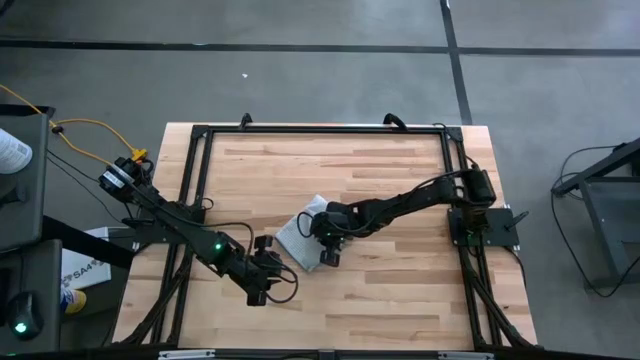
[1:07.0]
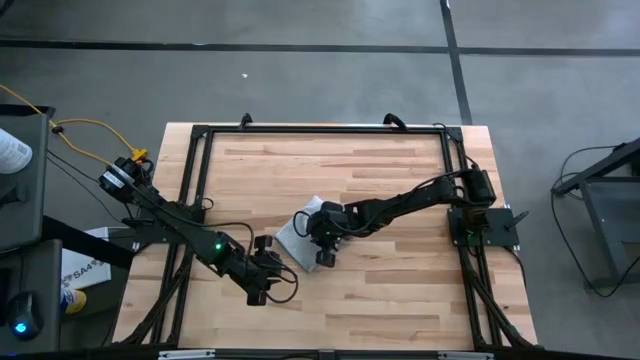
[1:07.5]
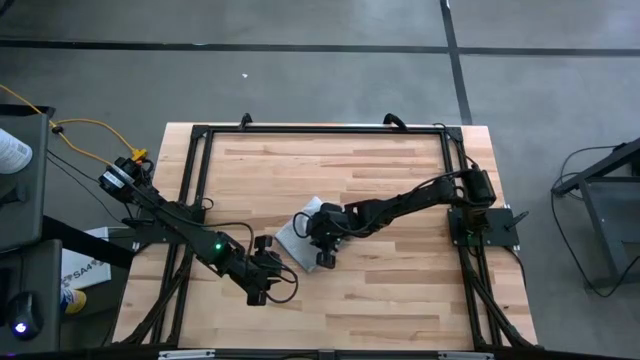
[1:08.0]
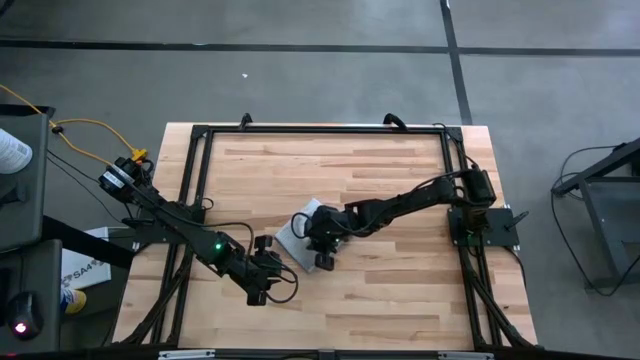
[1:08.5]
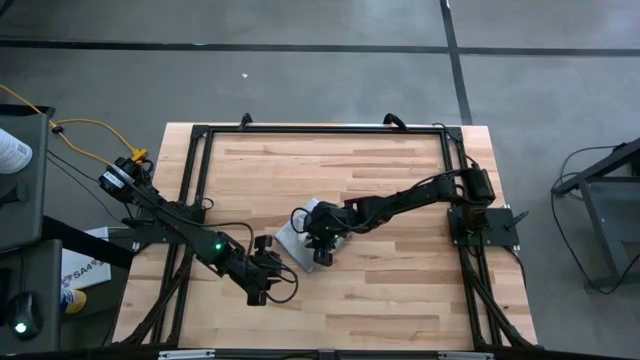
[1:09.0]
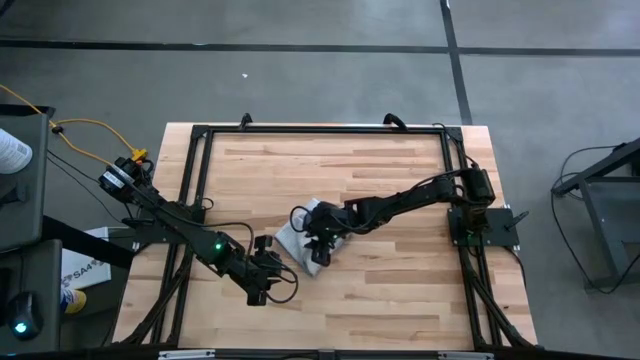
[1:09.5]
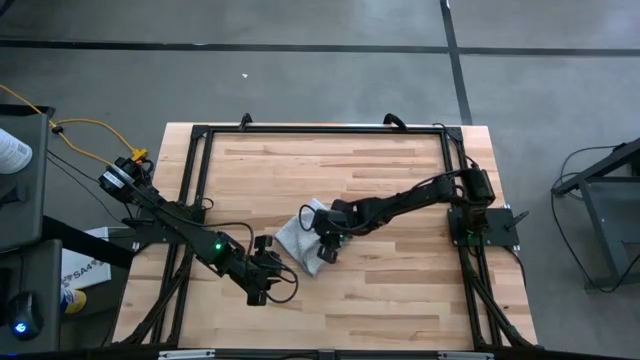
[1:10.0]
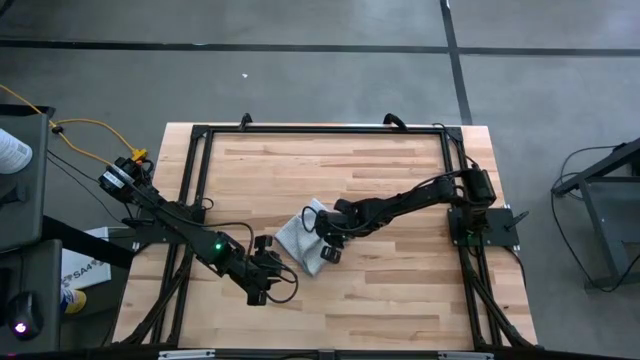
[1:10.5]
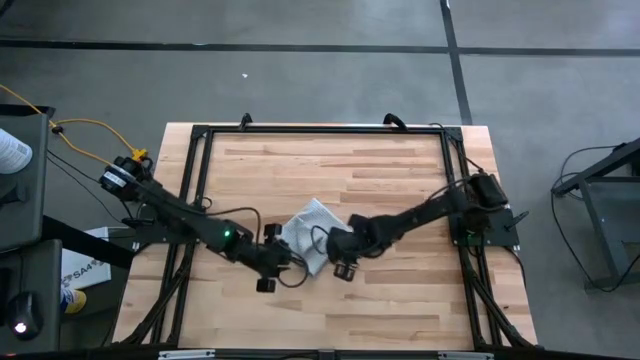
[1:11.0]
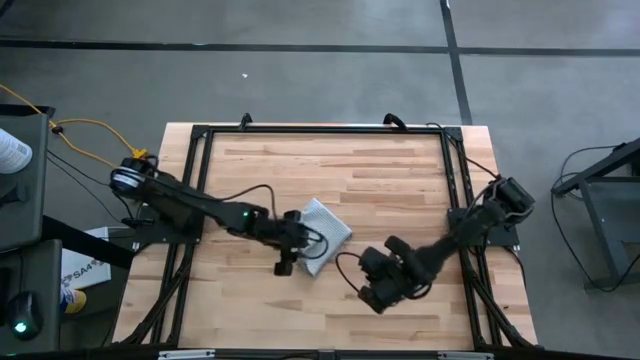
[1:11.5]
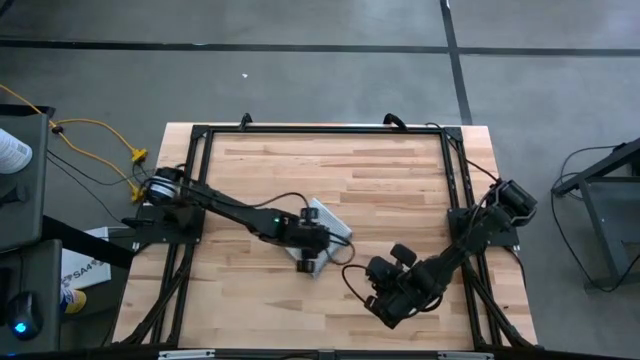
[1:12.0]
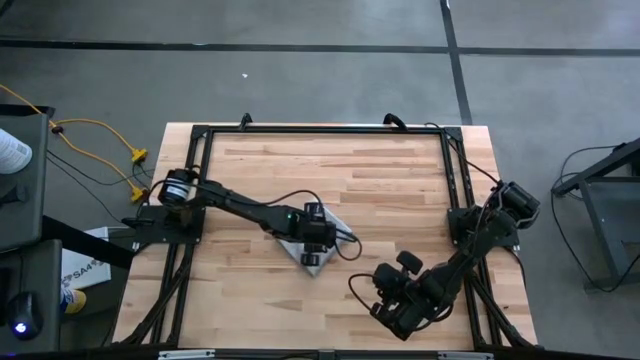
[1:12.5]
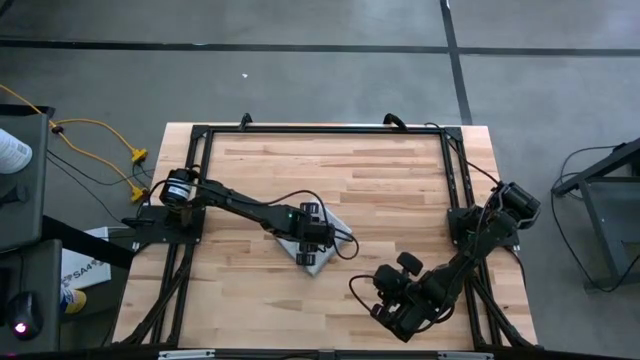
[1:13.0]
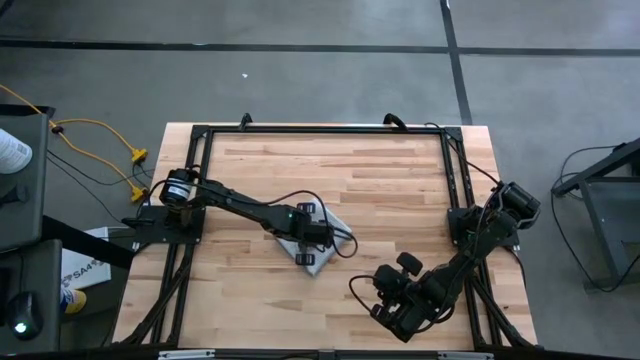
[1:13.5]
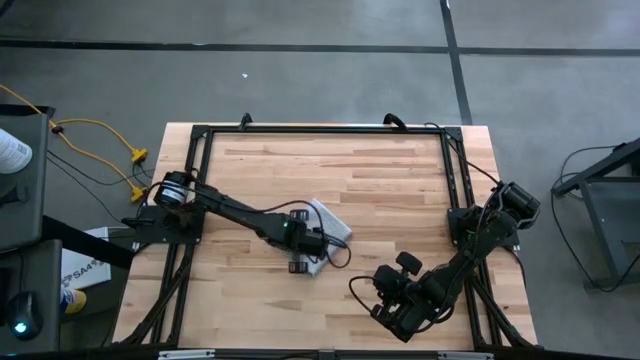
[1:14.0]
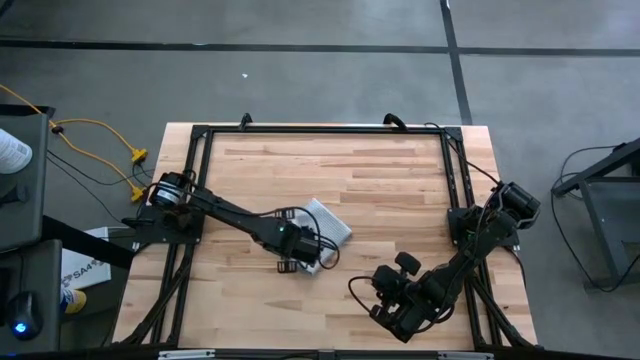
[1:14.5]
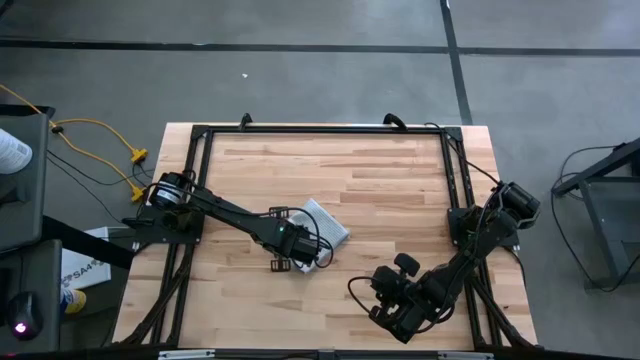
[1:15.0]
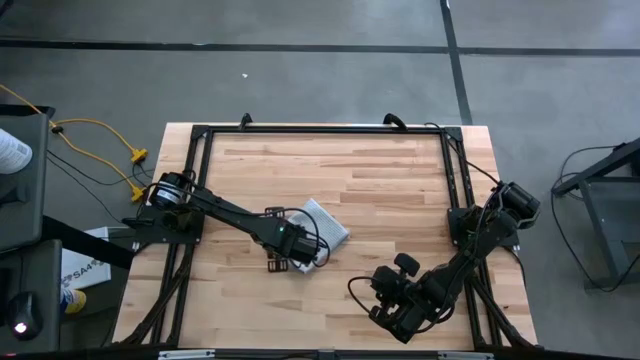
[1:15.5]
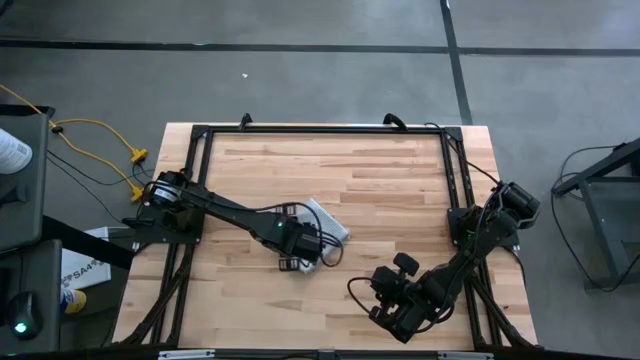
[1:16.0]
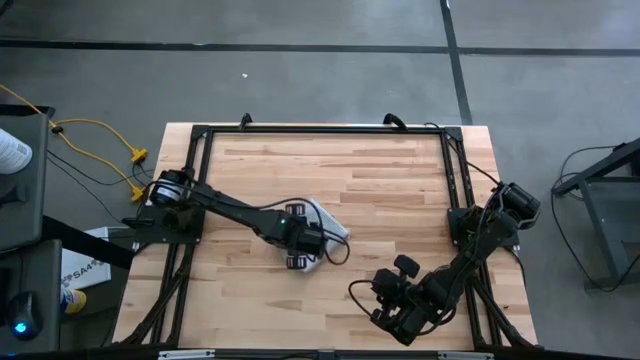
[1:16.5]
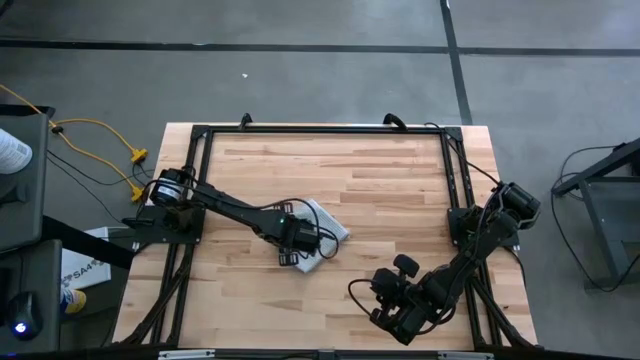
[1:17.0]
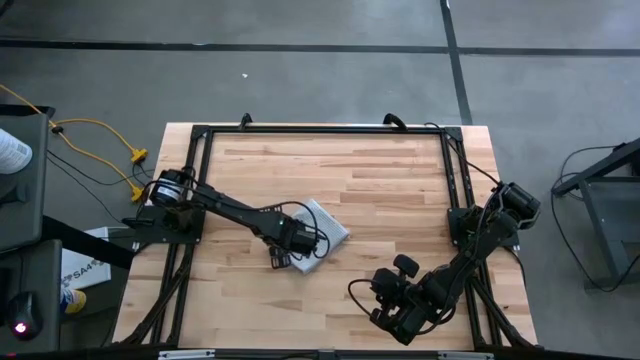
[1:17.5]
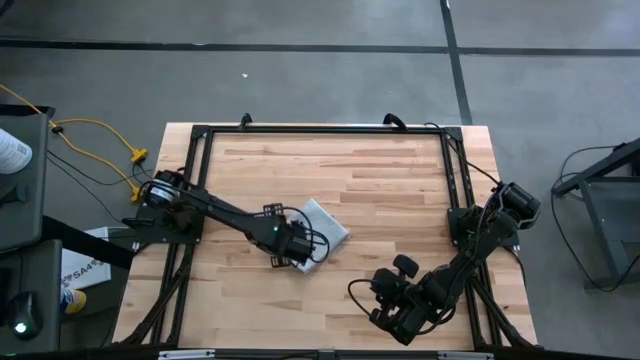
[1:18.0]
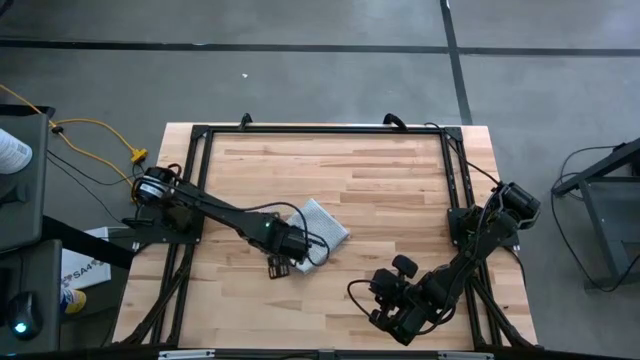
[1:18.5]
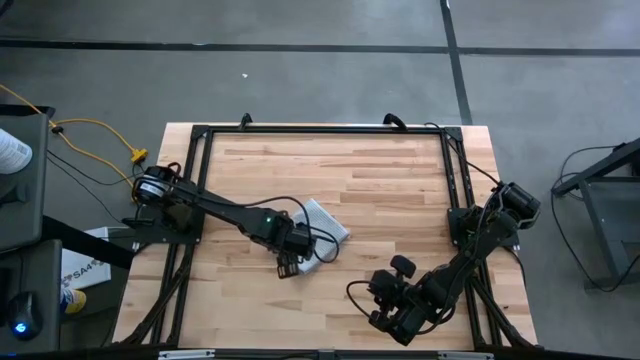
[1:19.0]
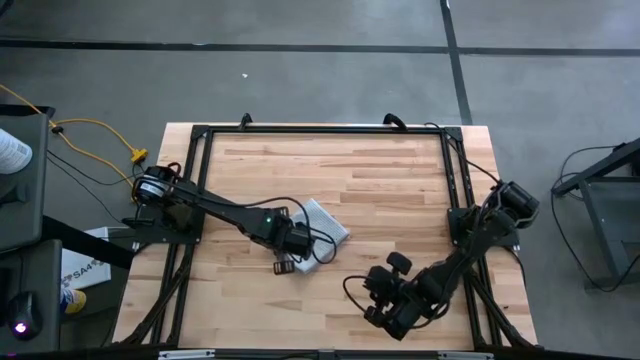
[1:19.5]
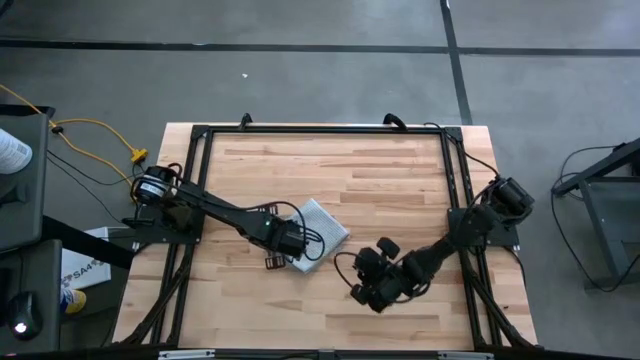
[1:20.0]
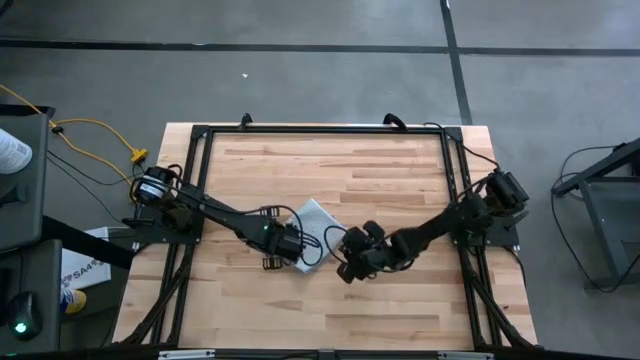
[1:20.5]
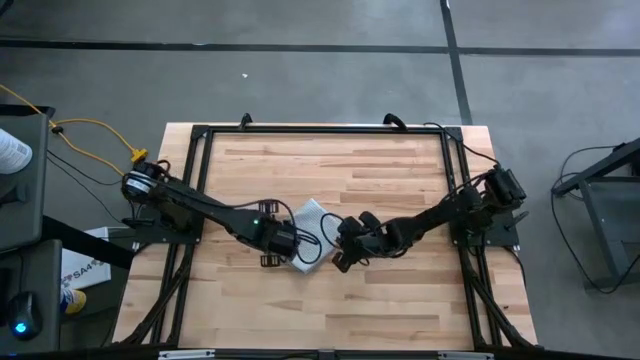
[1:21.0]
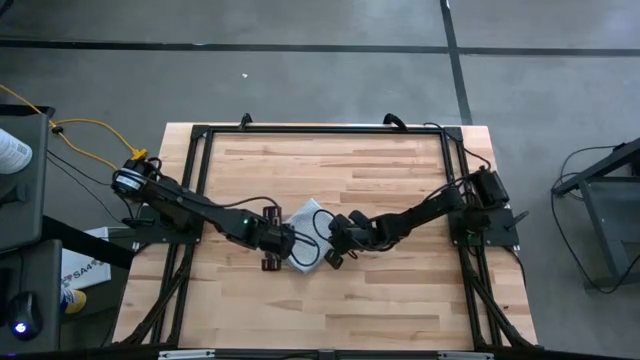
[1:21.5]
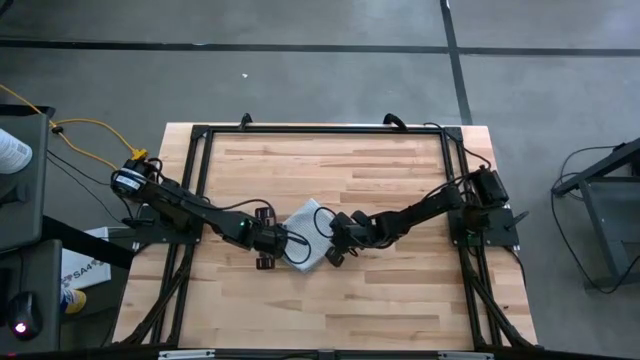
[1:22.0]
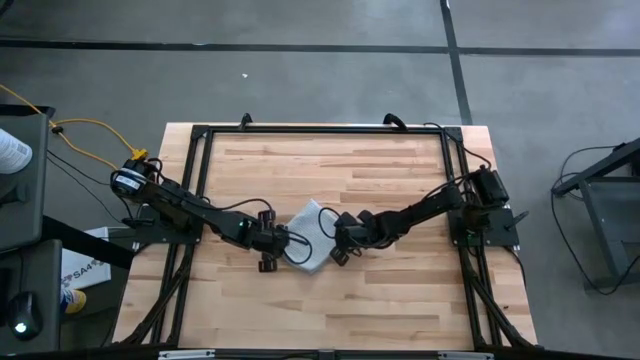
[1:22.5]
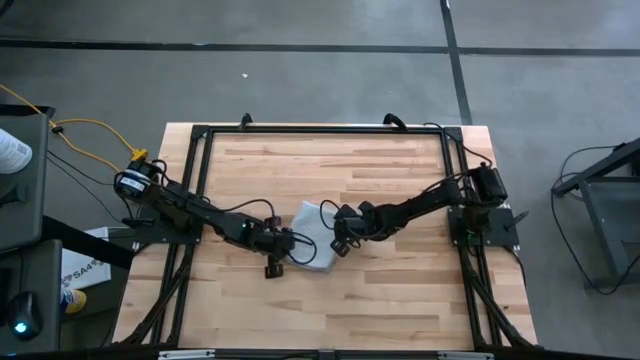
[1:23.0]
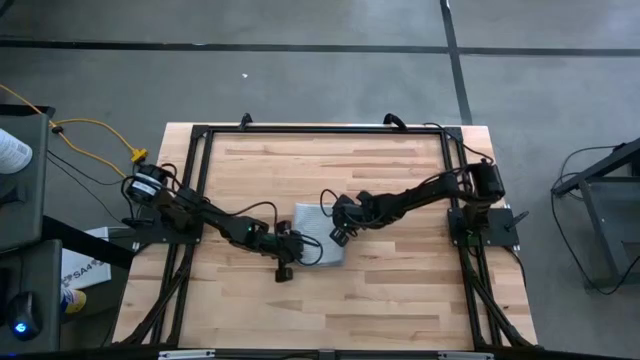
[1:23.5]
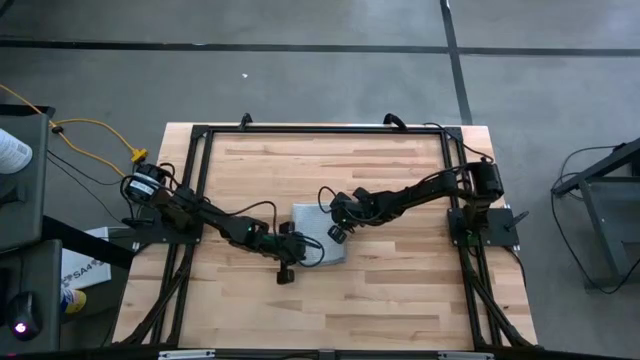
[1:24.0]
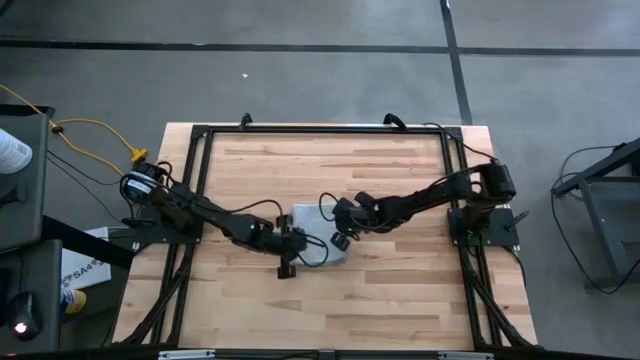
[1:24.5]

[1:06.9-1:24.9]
Task: Fold microfiber towels
Fold the gray microfiber cloth

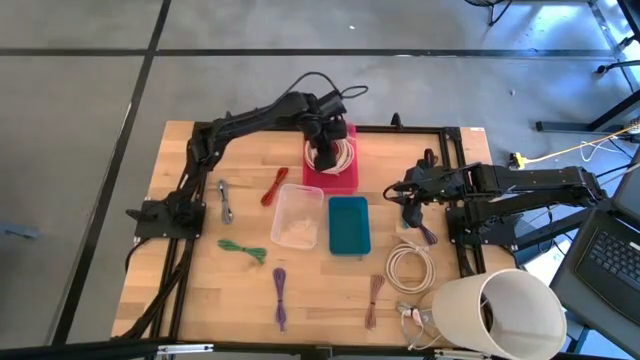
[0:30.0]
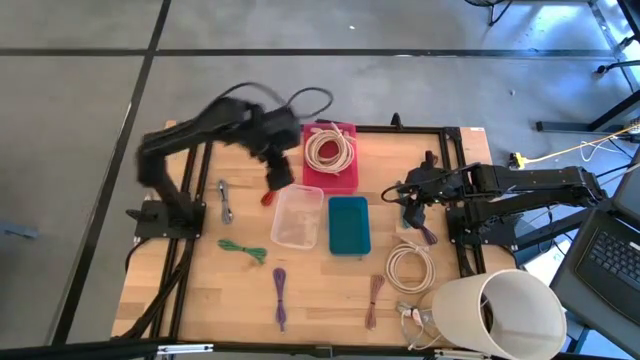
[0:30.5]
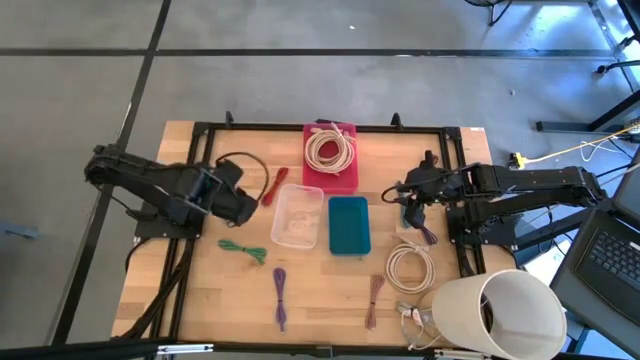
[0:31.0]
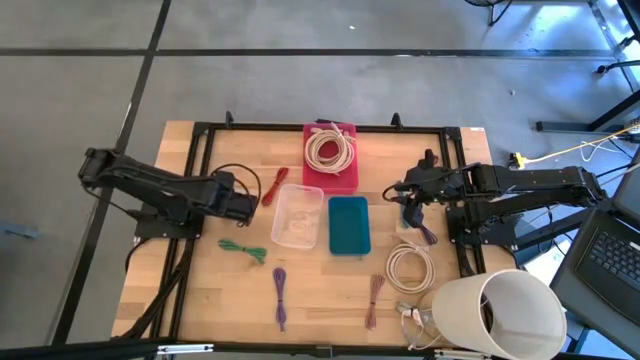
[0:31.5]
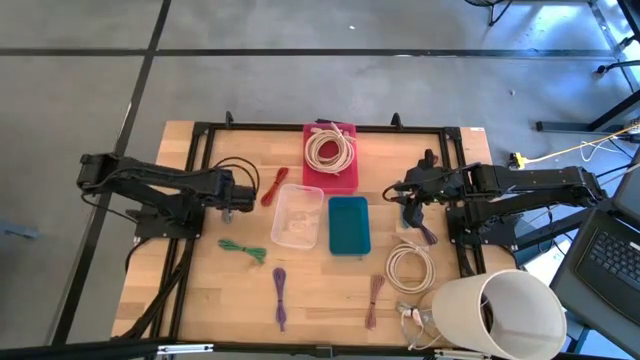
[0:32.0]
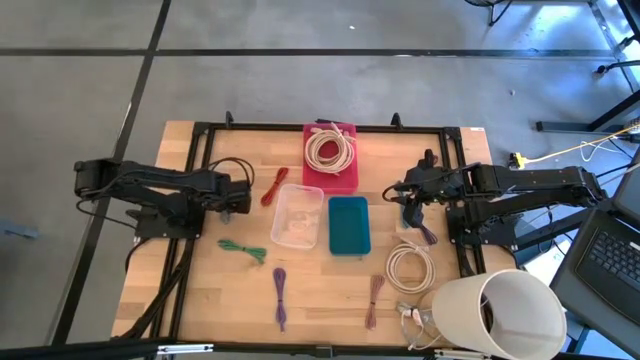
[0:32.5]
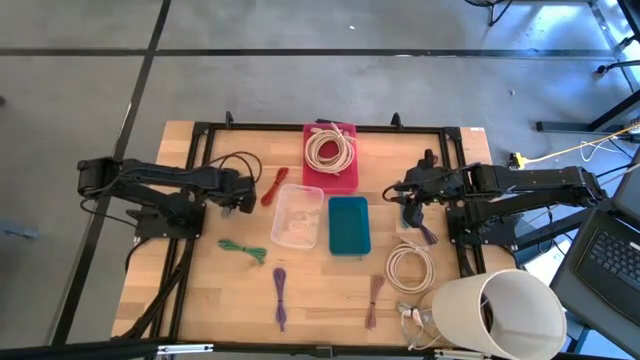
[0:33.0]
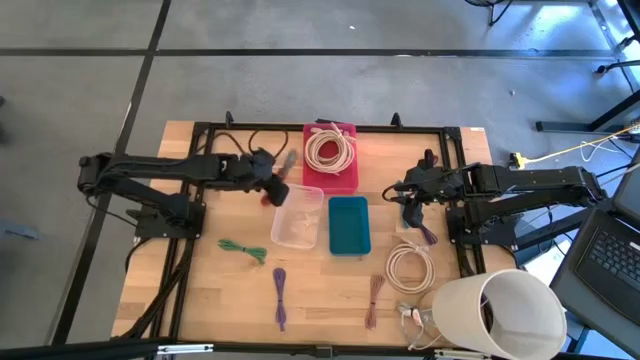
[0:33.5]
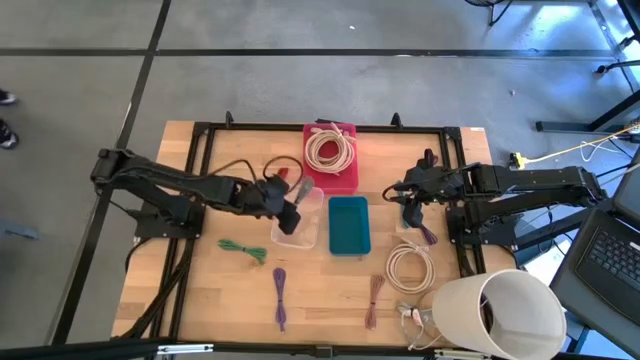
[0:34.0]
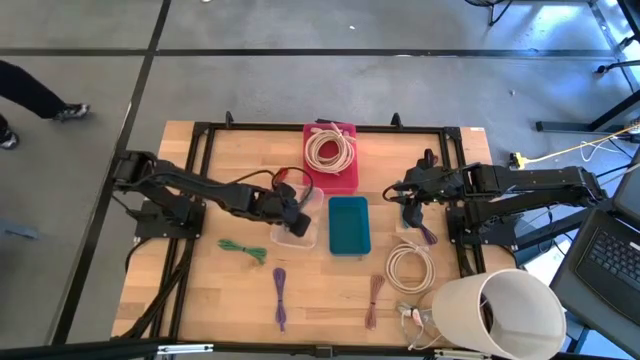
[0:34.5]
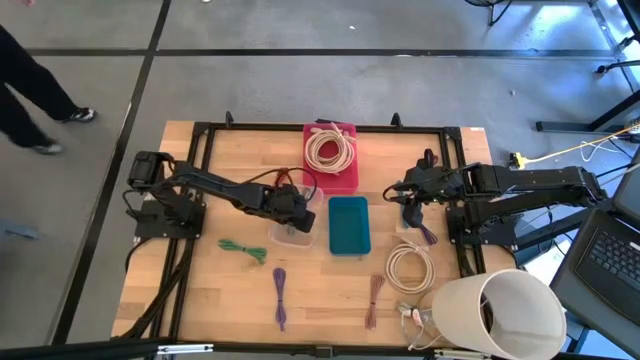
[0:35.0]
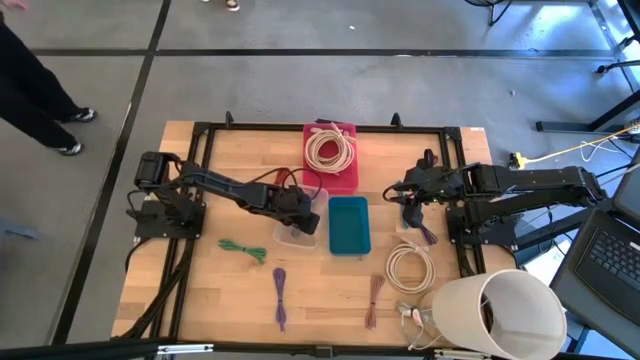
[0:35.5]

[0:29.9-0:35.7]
Task: Pick & Place USB Port
Put the black and white charger cable into the transparent bin
